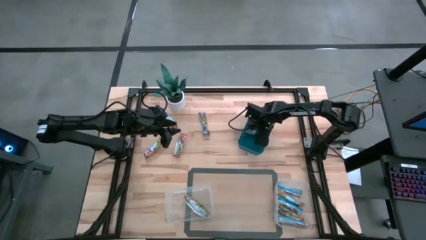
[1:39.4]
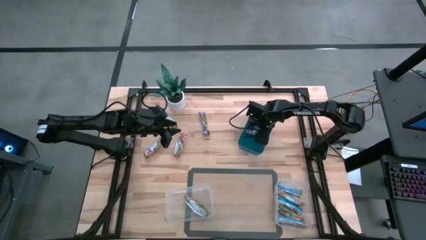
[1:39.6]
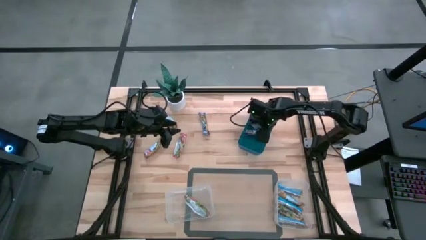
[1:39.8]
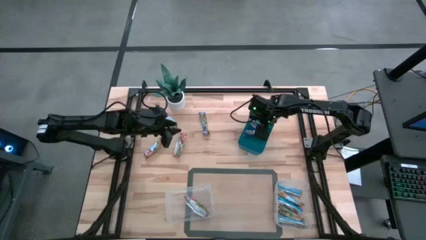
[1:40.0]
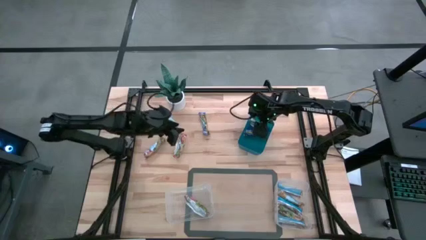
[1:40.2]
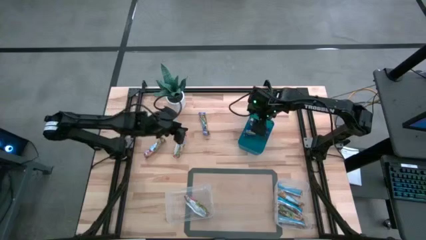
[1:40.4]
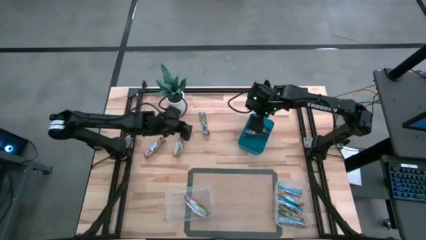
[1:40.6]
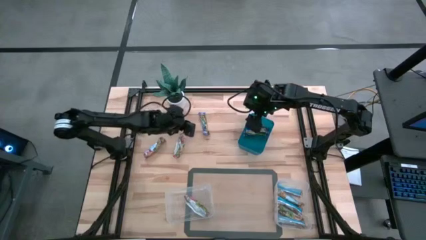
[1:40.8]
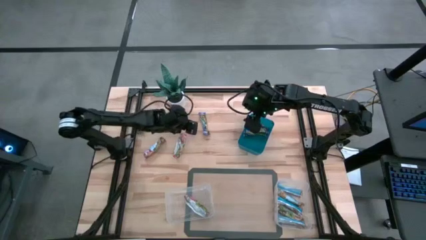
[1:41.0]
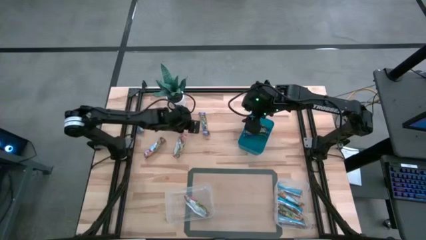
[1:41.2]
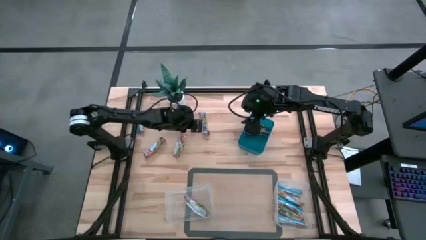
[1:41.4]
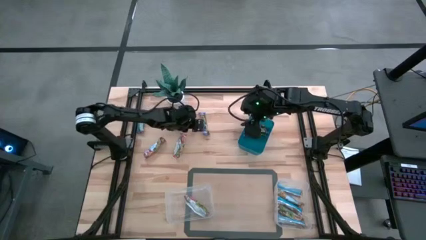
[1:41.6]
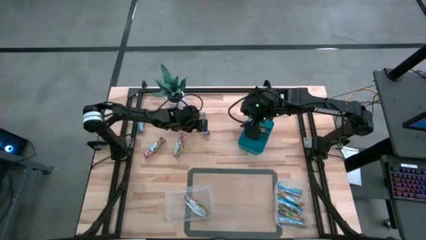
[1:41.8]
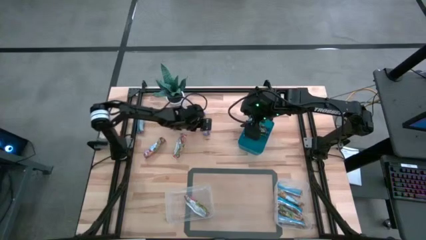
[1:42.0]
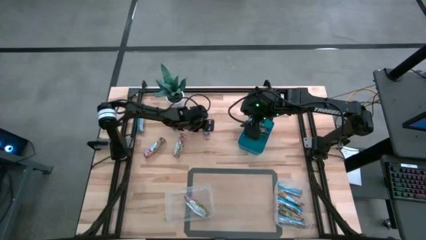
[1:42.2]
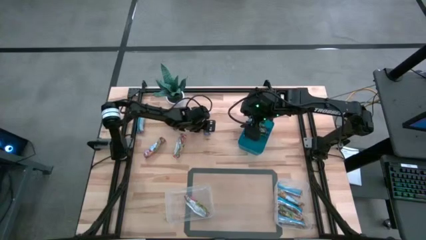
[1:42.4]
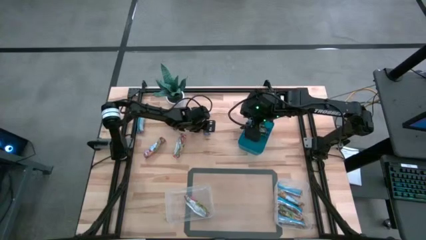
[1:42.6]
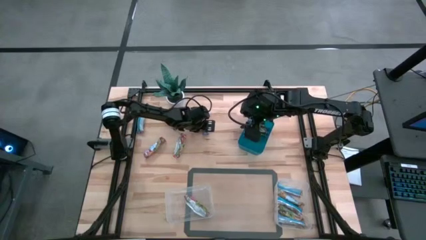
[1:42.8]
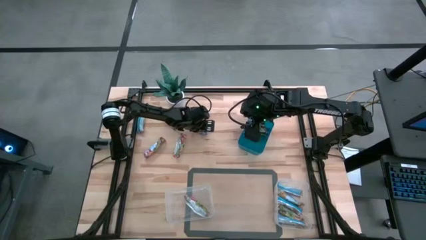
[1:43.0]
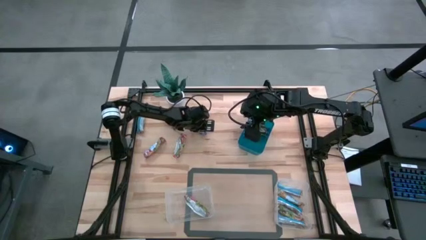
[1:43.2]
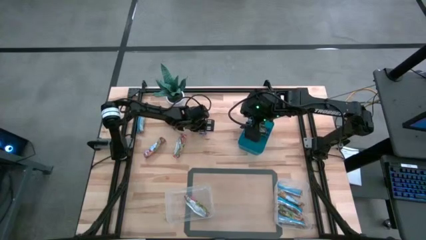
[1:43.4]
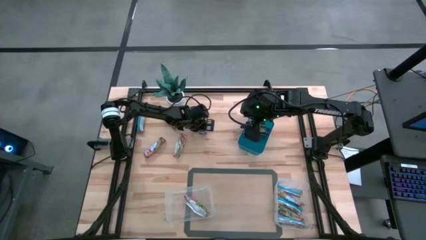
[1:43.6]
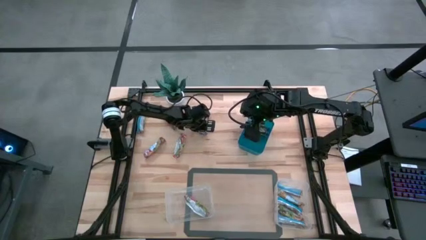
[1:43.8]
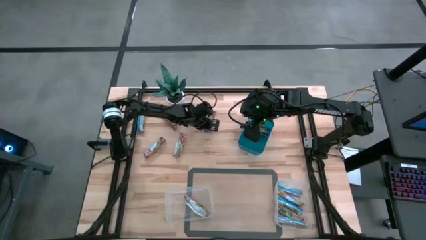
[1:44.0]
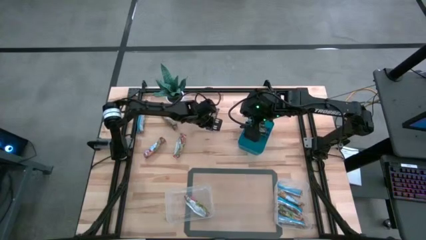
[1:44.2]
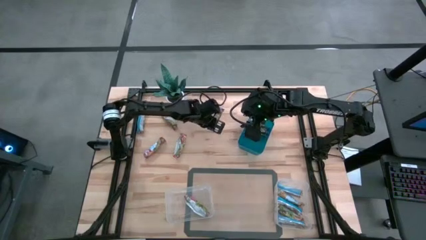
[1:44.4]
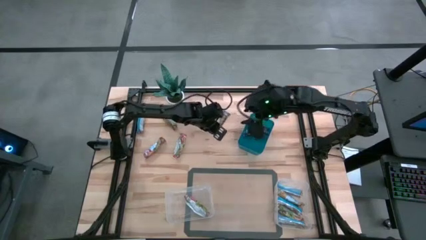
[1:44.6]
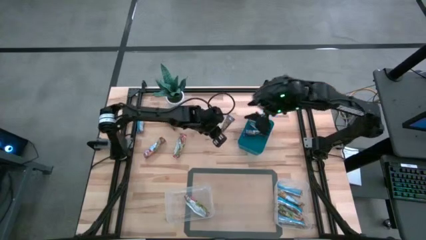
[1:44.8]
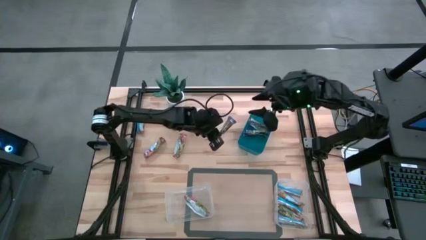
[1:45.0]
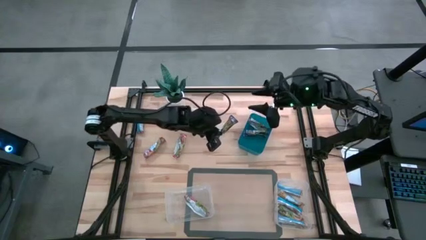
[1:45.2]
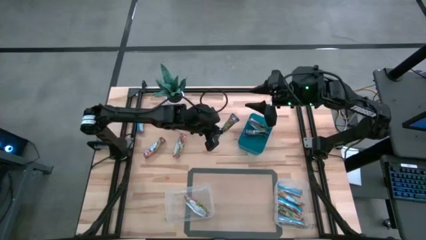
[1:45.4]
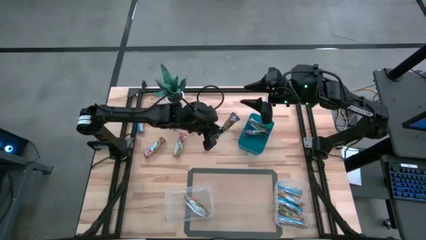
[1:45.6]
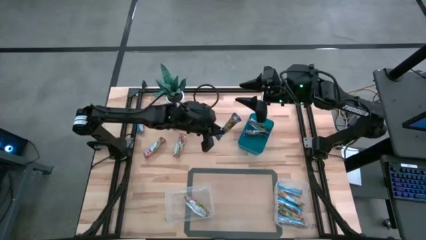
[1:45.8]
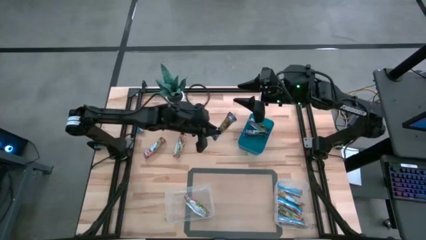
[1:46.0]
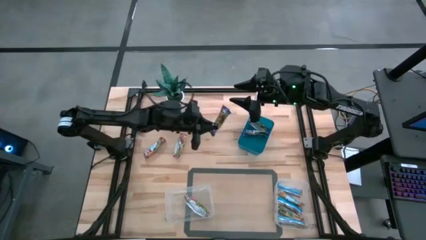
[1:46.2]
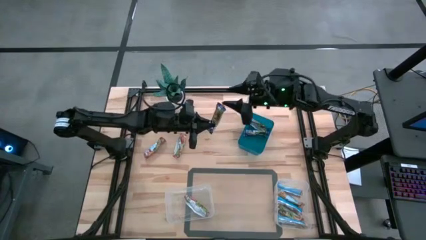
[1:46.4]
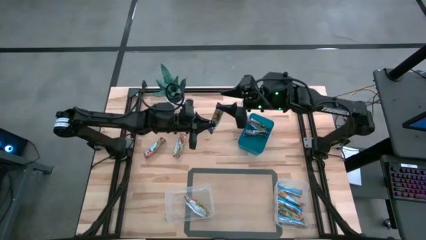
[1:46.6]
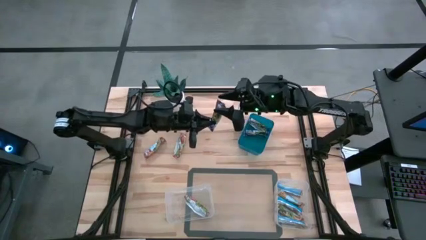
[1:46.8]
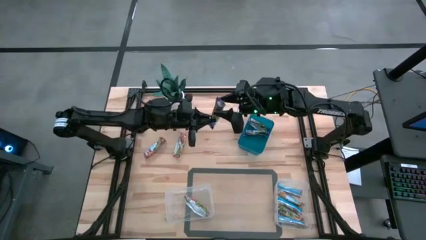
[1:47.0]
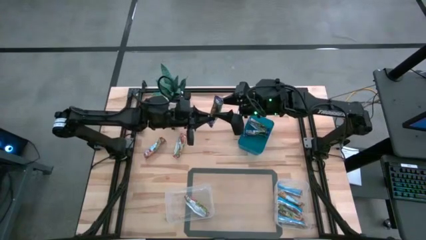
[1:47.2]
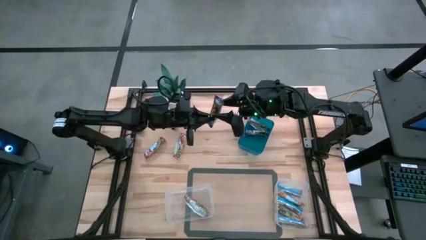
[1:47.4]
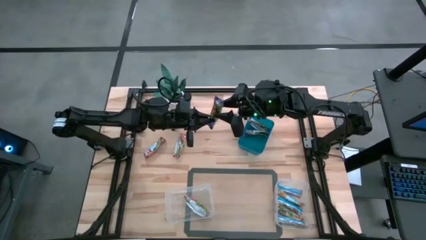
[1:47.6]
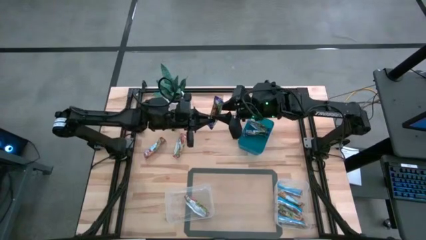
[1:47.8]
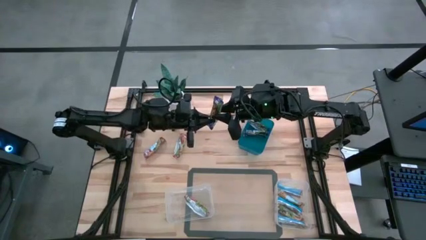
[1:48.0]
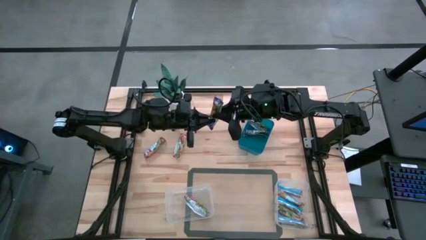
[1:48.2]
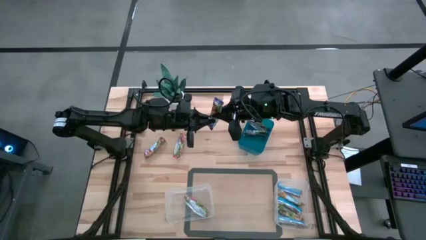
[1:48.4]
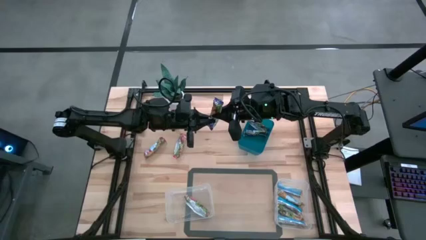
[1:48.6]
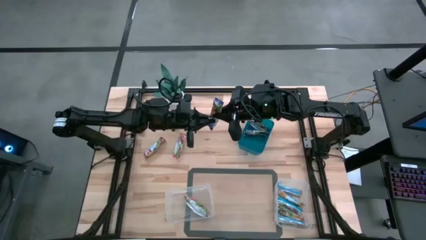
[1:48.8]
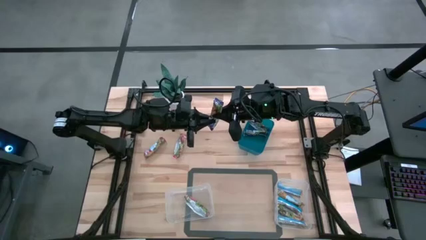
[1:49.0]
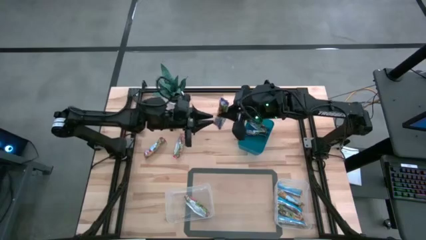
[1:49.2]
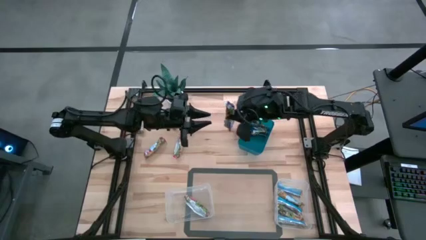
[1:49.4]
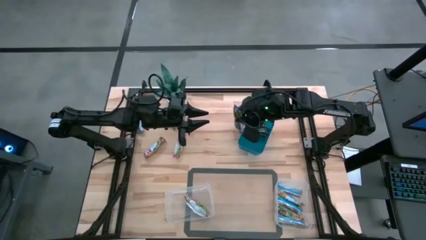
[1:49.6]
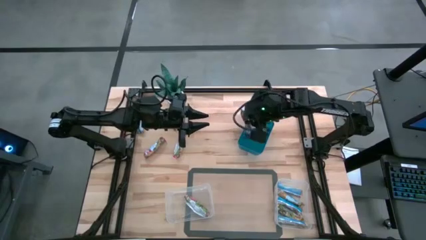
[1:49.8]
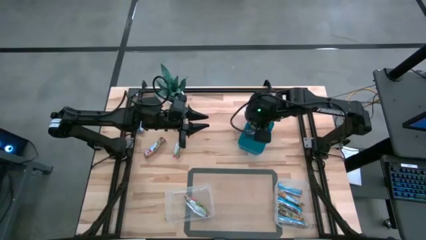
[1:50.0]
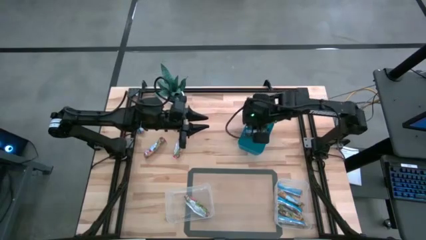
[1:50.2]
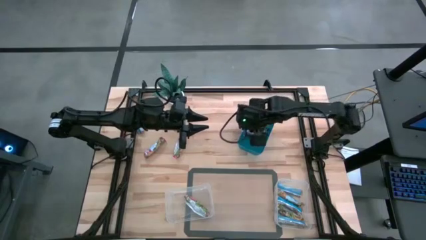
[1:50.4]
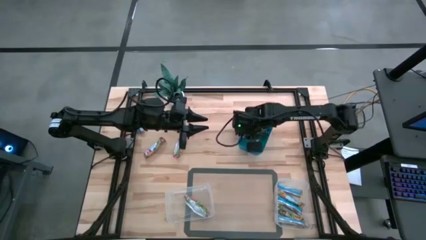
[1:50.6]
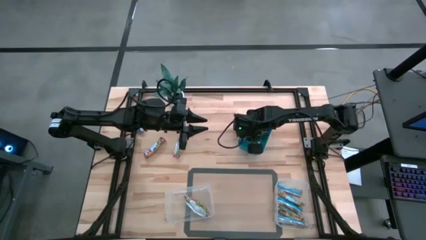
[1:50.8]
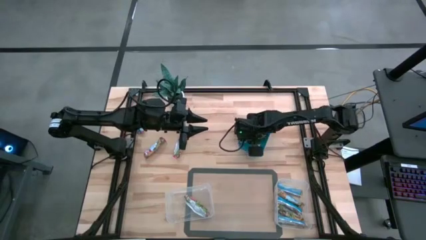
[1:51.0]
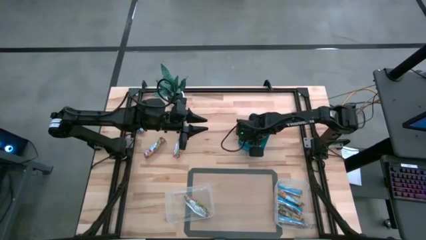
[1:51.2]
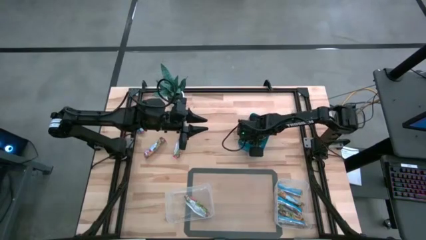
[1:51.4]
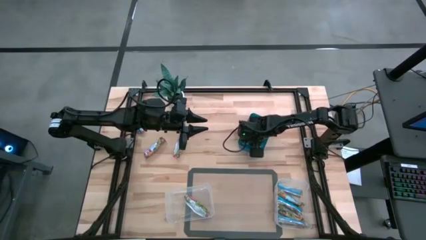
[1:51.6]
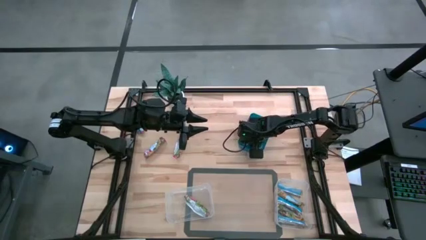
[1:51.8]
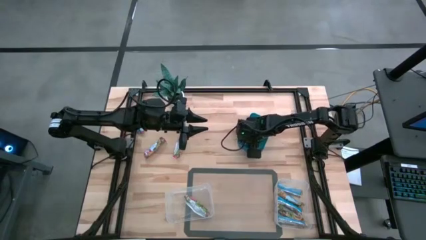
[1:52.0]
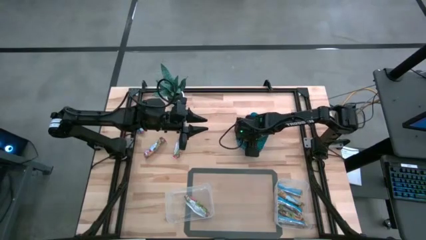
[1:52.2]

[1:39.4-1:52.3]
Task: Pick and place Granola Bars by type
Put the blue granola bar into the blue bin

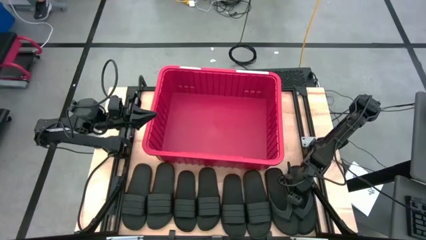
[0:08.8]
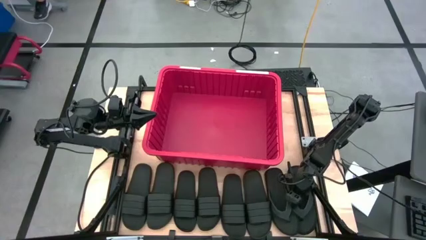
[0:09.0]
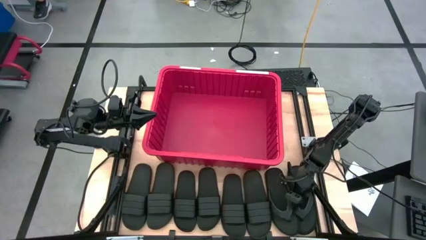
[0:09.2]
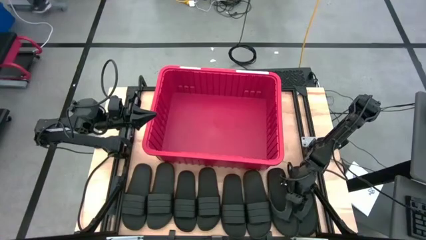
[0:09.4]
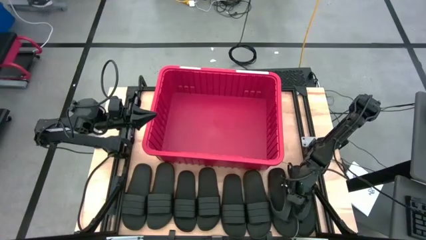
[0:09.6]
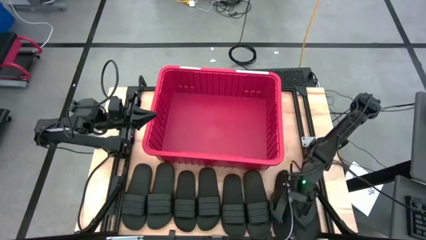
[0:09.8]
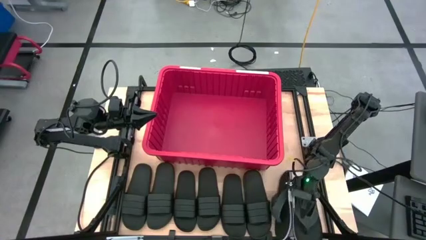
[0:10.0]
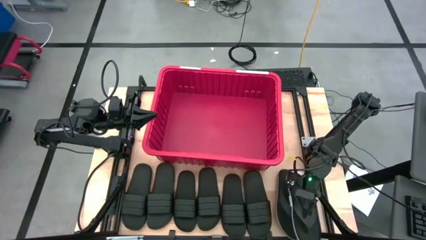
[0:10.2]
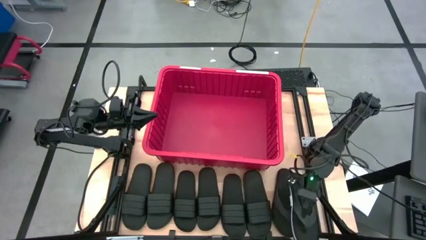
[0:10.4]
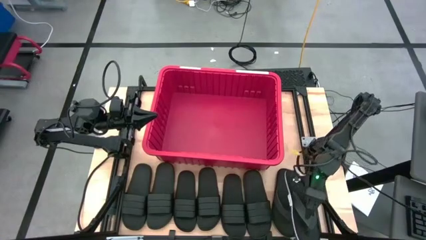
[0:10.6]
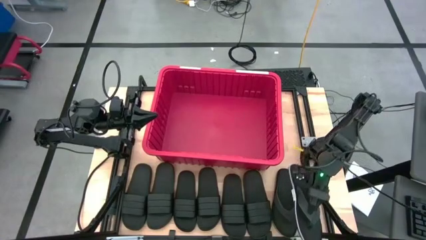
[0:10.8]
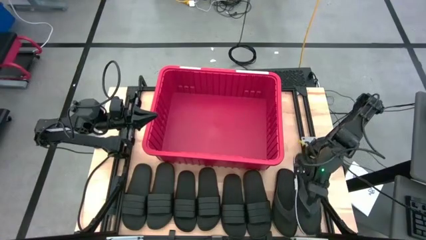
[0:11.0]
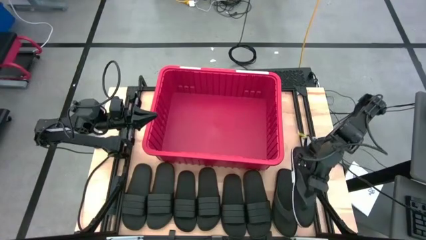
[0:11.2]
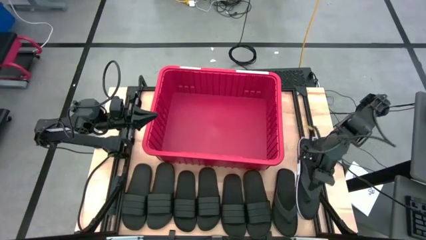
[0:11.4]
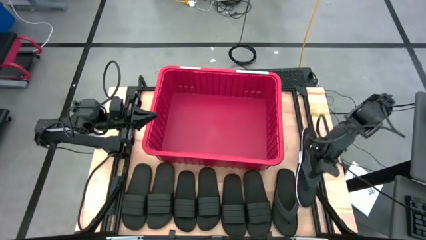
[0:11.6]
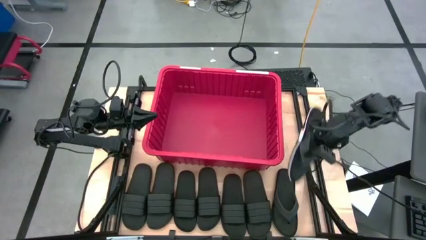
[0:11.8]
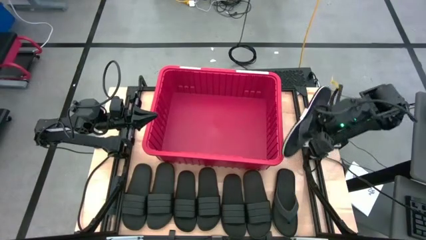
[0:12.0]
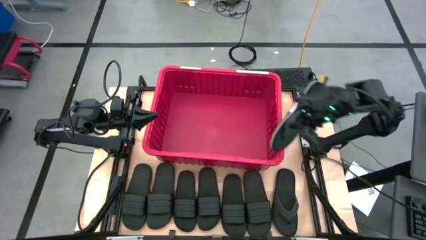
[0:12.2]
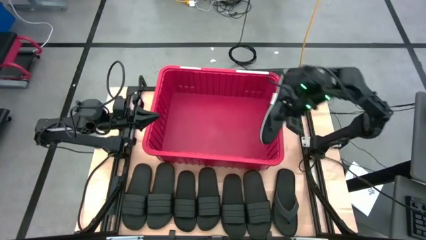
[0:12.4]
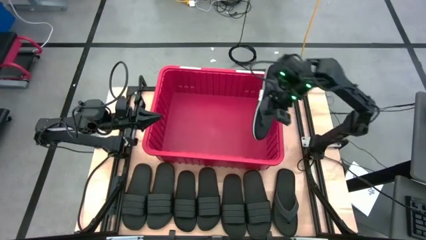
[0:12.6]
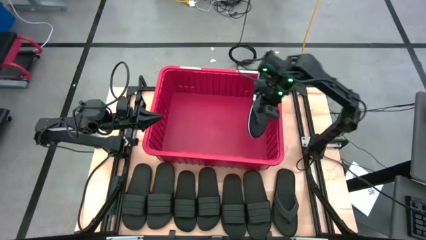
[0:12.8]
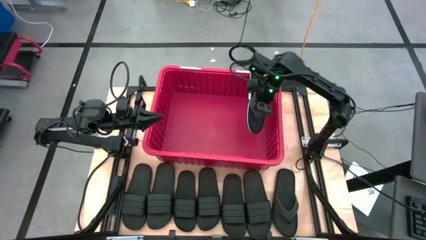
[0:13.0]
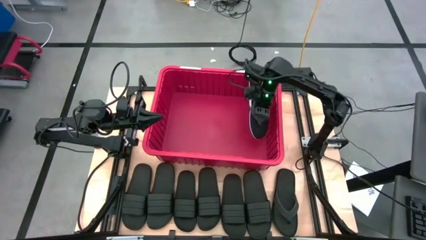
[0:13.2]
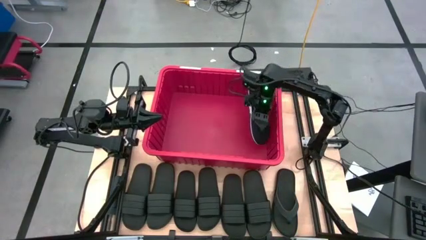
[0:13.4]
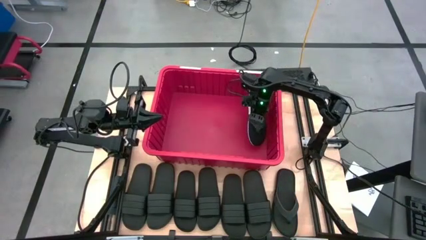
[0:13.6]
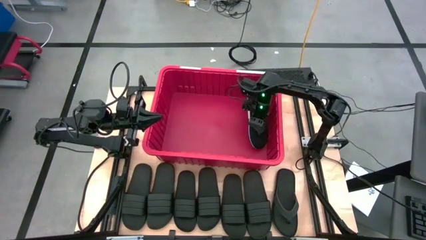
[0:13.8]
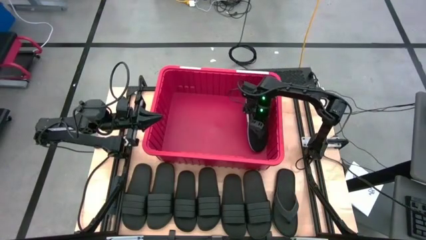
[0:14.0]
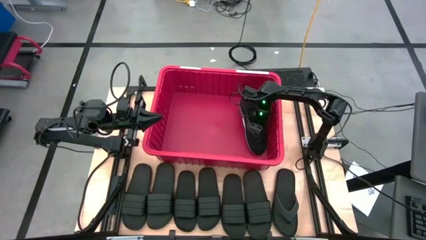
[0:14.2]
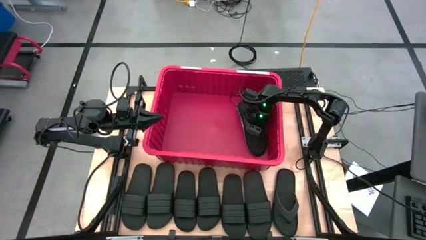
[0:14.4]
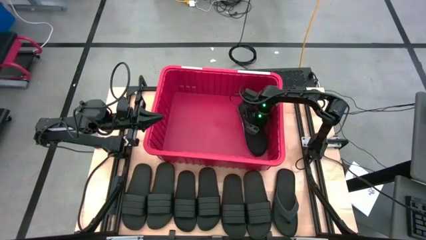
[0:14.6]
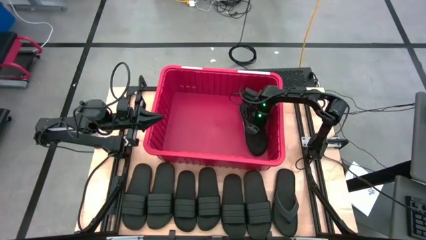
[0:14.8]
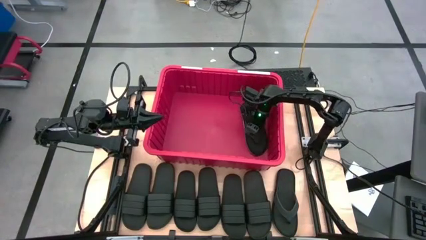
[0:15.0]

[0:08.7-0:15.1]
Task: Pick and place slides into bin
Put the black slipper into the red bin
